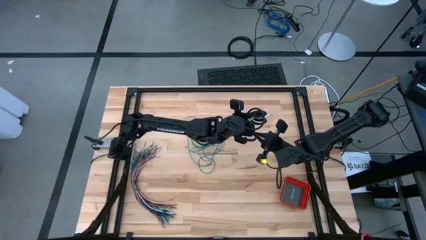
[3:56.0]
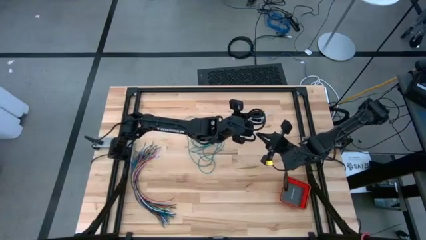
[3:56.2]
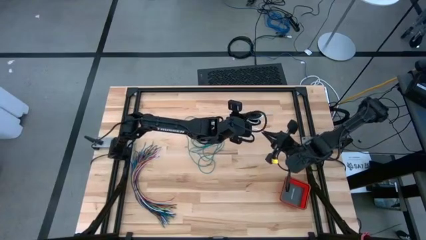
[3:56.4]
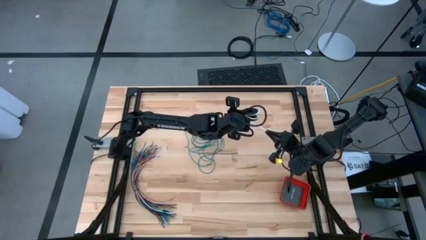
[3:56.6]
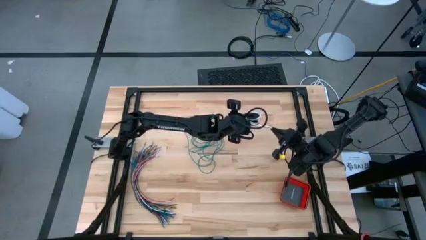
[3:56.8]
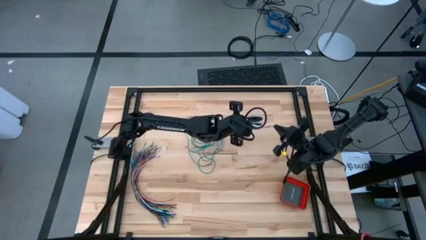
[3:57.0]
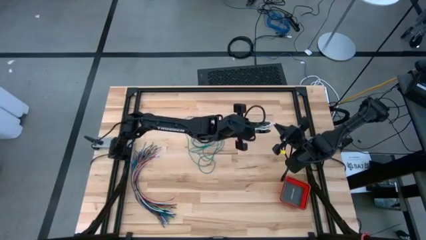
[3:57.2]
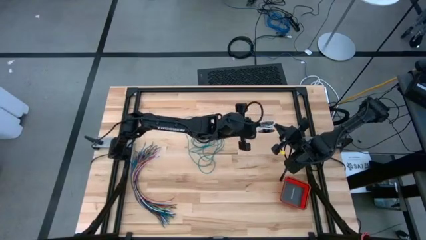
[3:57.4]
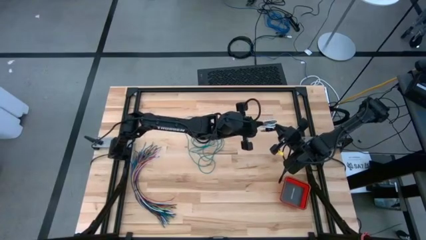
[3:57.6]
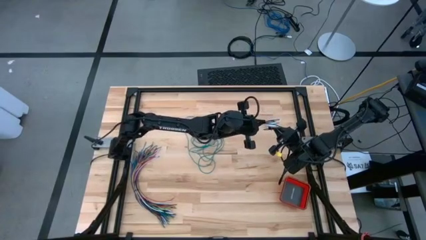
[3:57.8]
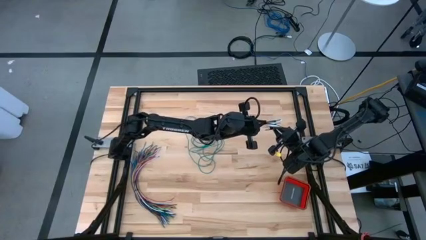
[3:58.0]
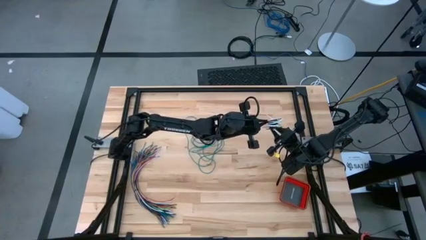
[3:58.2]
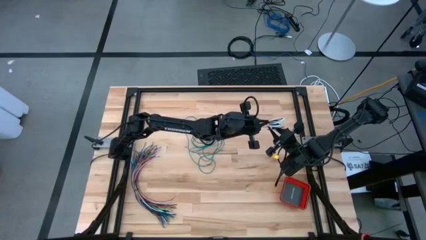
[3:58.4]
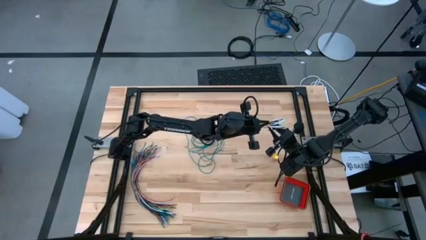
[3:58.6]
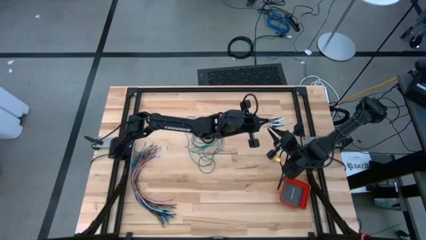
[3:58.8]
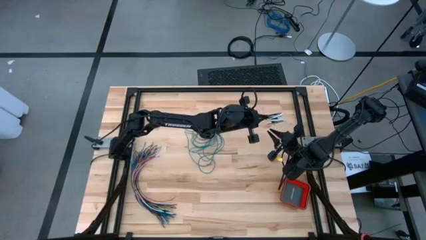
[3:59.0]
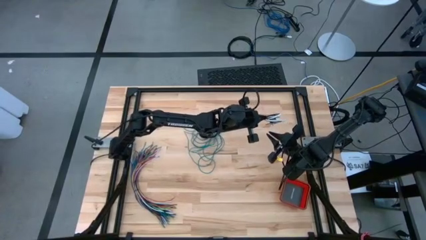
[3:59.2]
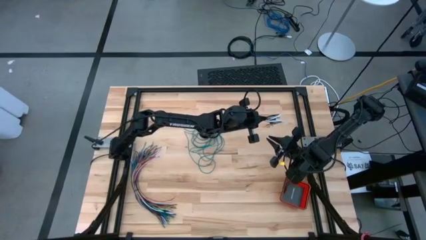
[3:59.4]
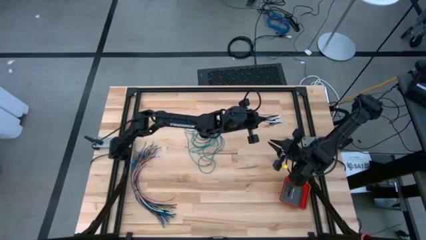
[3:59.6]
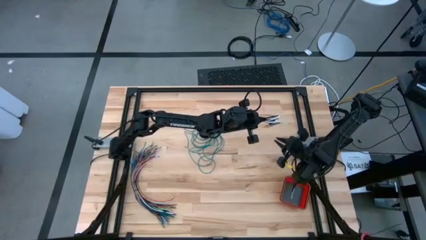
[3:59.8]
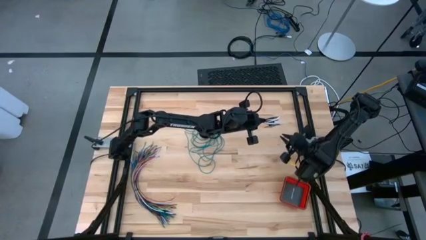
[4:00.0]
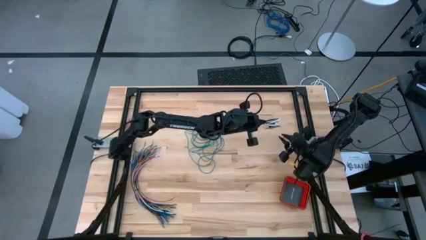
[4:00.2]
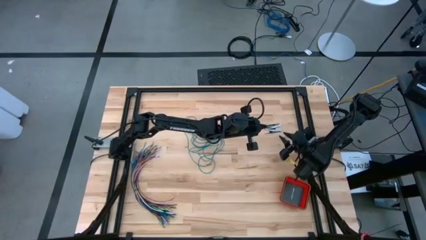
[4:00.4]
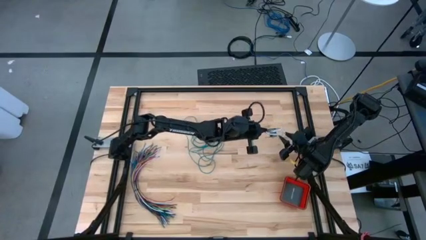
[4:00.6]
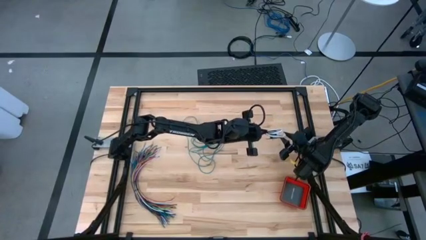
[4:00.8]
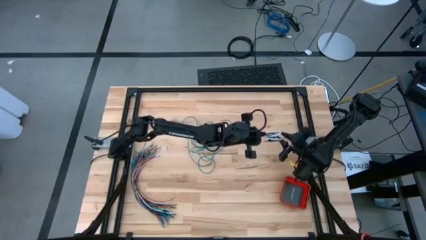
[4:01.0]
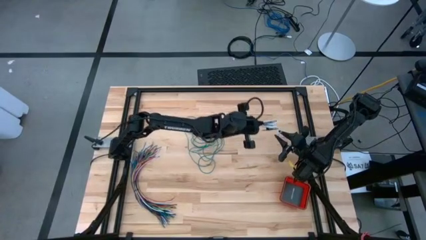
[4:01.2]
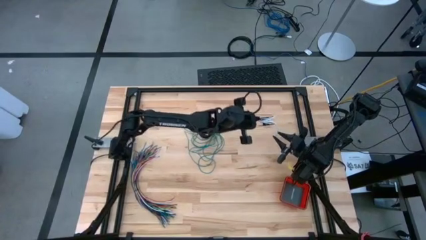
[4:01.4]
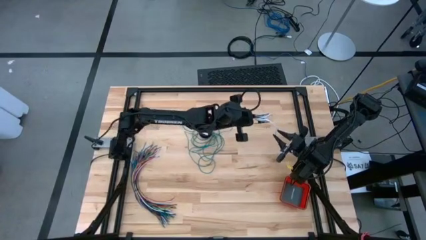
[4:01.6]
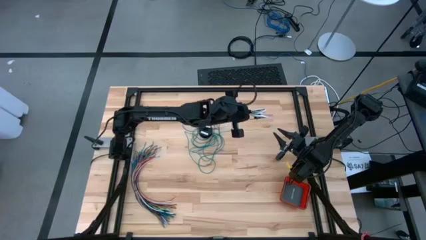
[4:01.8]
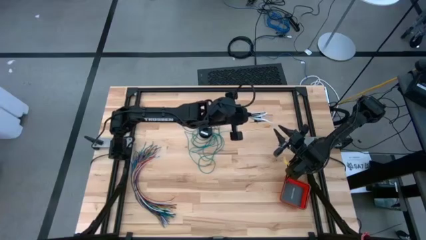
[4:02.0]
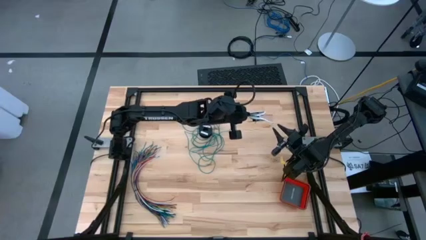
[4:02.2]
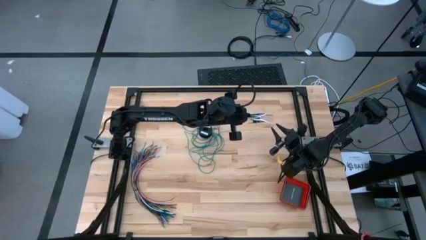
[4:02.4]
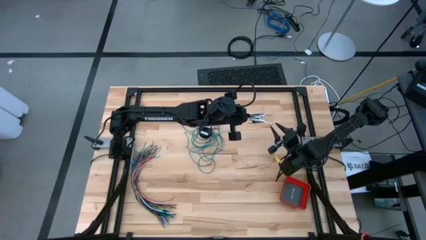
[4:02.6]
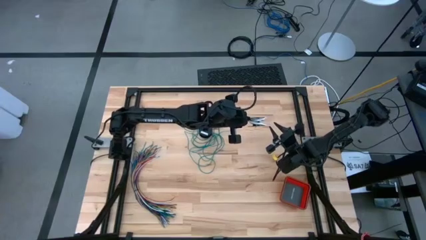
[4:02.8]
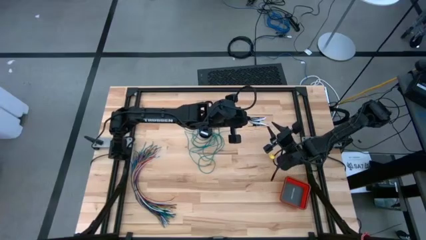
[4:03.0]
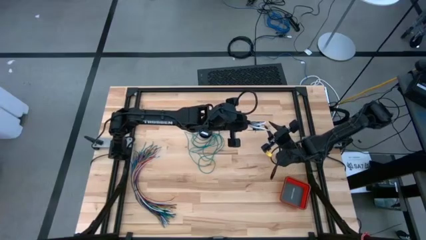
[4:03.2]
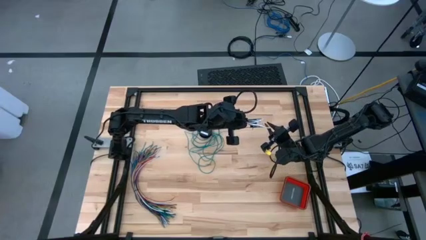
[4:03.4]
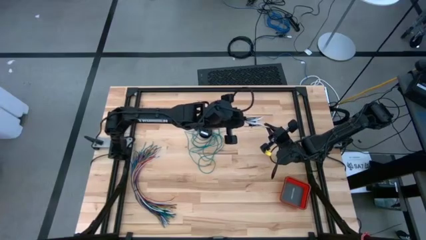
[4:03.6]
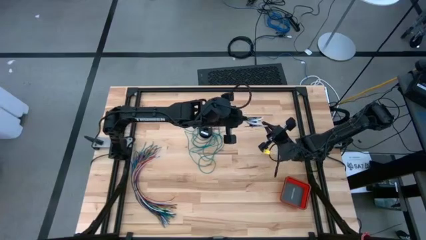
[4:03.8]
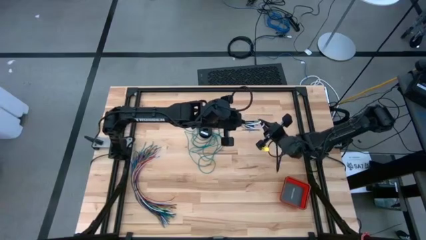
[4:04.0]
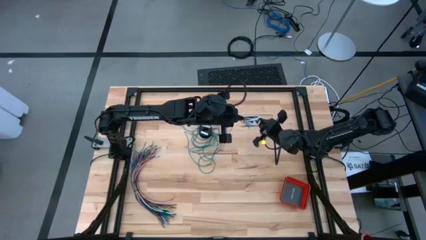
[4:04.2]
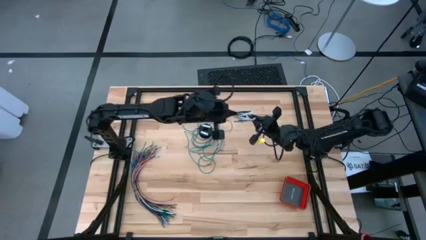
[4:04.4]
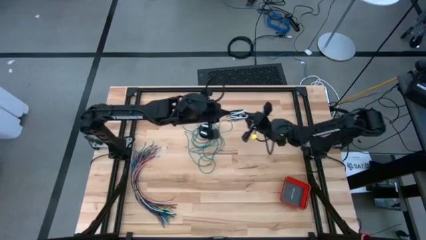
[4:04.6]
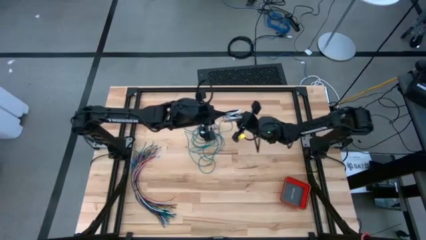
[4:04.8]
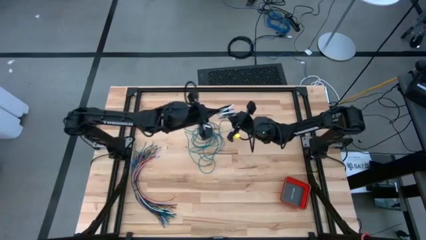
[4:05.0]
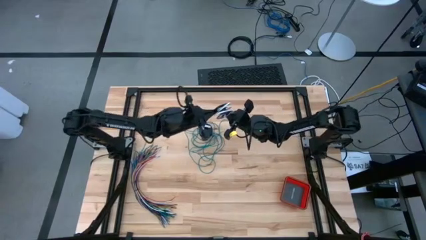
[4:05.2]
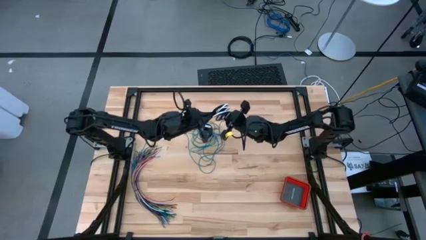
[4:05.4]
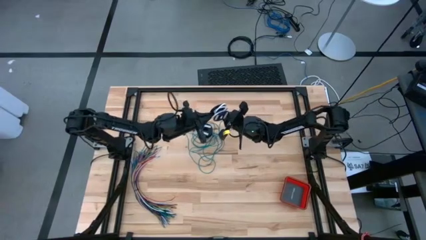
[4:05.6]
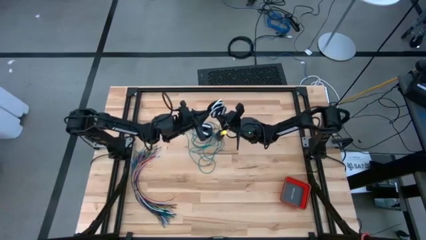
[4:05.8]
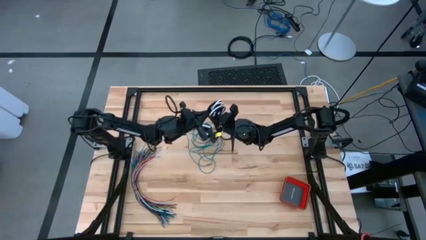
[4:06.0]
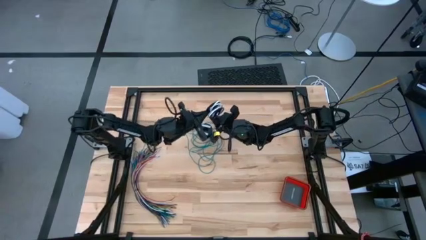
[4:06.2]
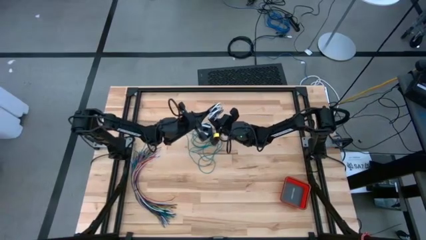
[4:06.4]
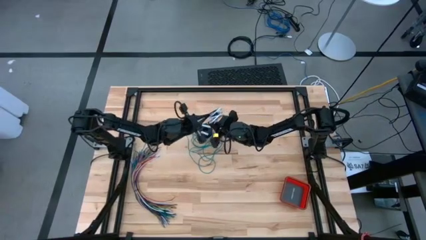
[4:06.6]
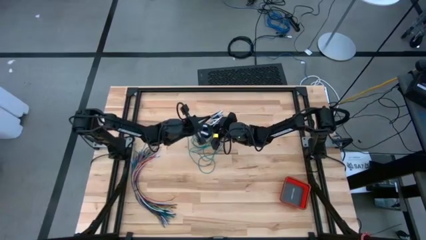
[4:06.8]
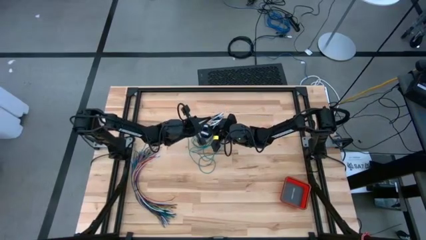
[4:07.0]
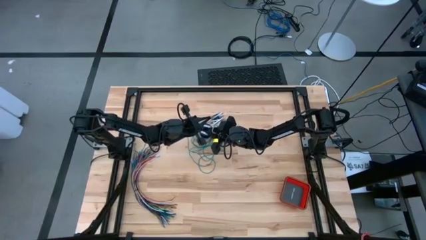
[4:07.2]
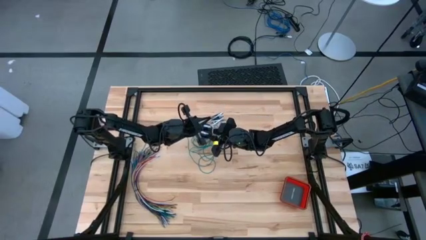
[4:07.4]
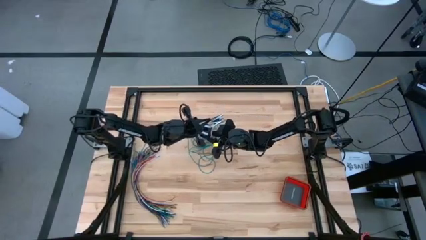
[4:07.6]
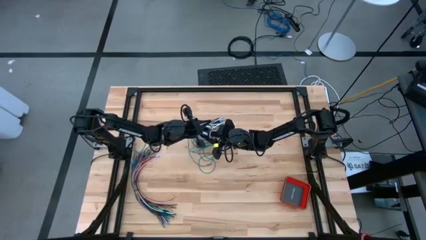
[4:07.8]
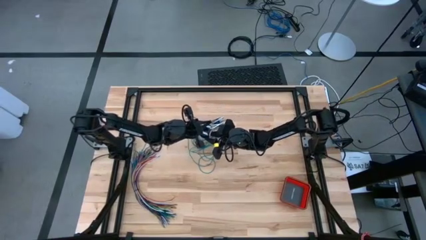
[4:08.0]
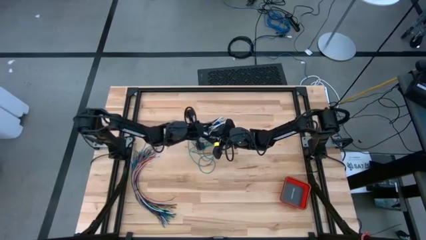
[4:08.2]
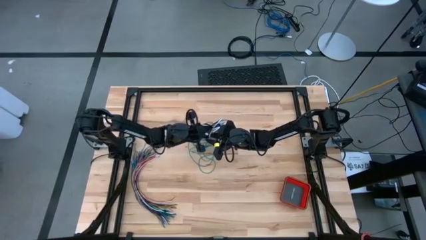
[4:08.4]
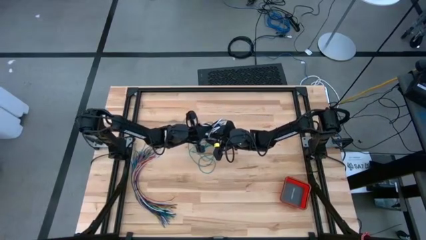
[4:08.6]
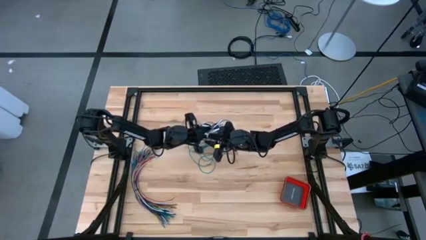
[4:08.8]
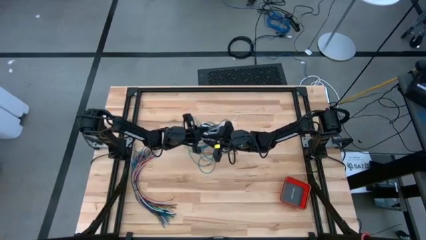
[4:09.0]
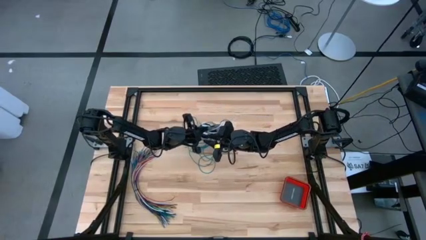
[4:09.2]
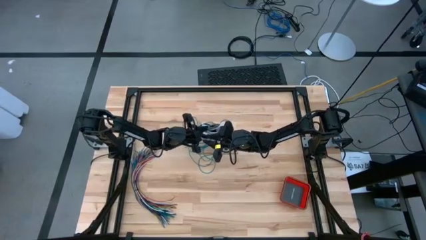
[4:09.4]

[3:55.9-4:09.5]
Task: Coil cords
Coil the white wire onto the spool

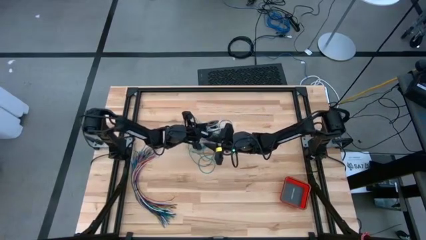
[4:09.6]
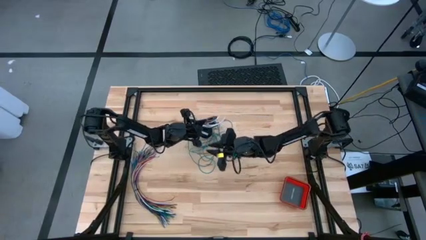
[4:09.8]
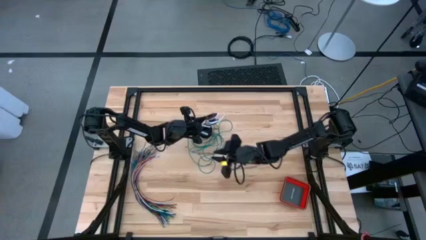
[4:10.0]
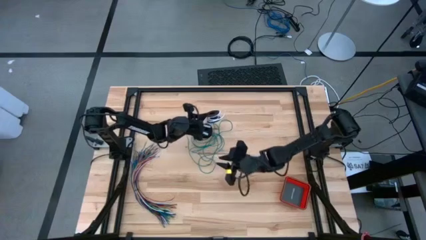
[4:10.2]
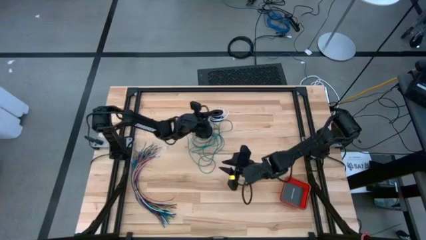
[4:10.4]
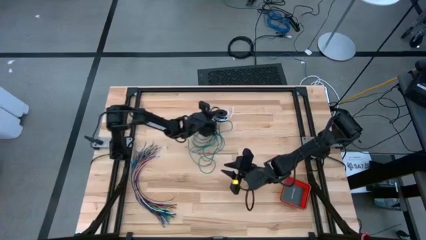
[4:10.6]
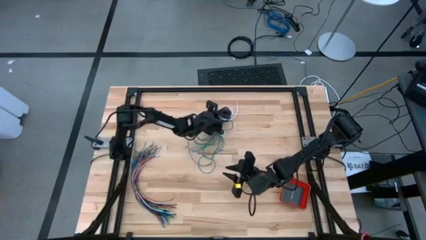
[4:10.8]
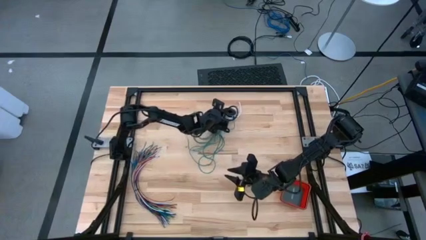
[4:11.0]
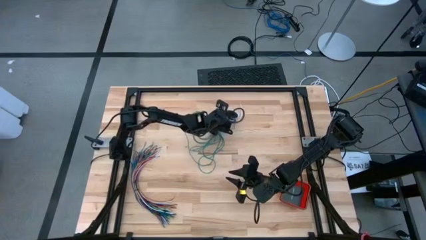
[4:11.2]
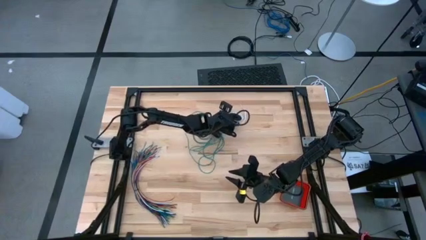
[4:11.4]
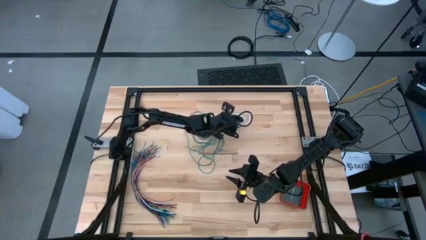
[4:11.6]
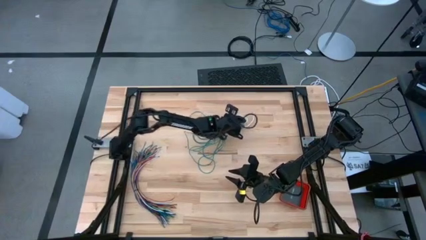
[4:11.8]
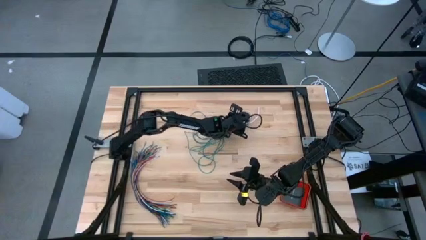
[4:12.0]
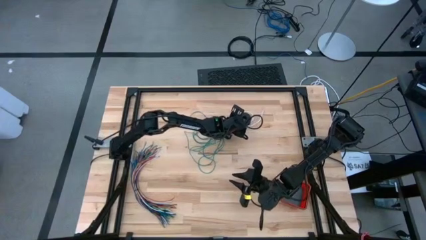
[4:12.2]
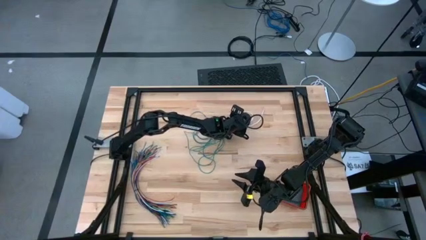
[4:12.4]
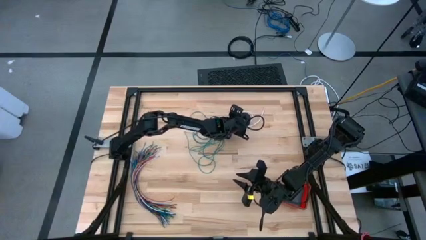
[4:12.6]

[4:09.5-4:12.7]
Put the spooled white wire on the table
